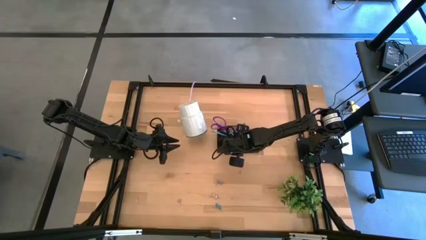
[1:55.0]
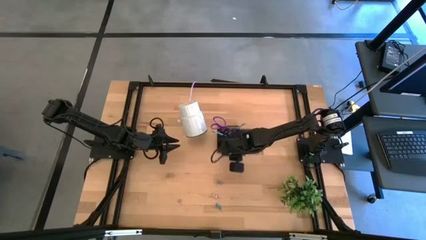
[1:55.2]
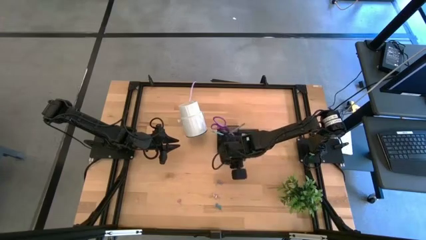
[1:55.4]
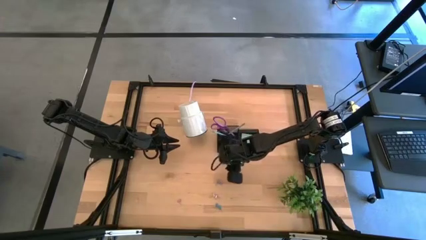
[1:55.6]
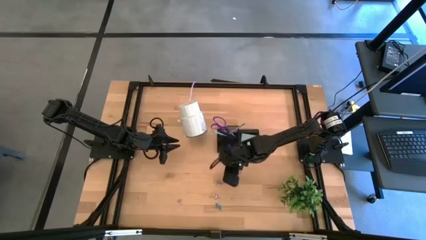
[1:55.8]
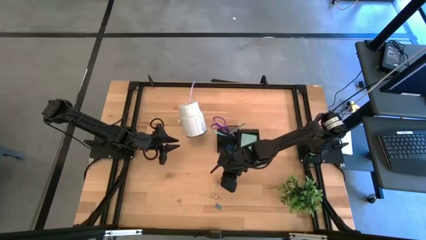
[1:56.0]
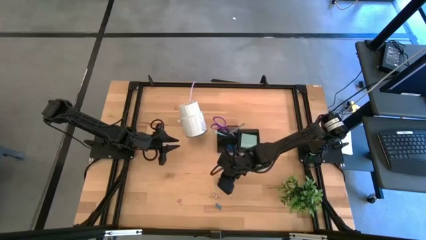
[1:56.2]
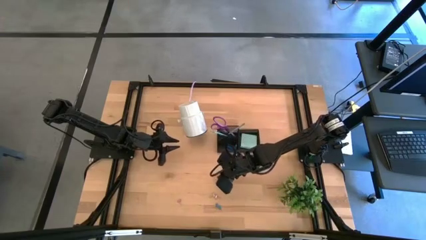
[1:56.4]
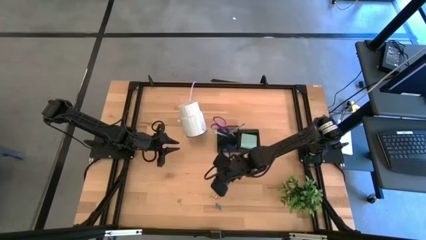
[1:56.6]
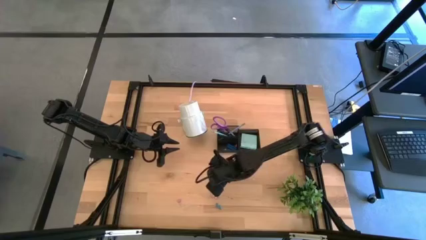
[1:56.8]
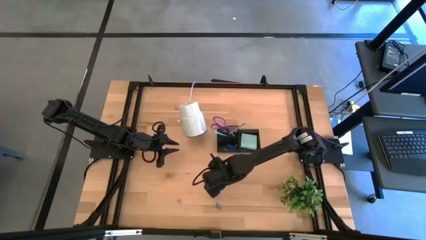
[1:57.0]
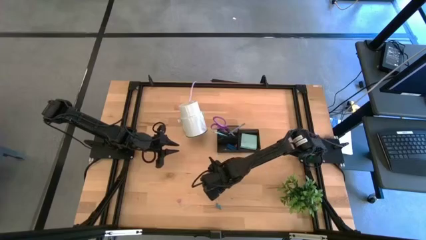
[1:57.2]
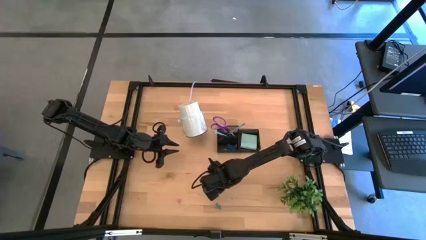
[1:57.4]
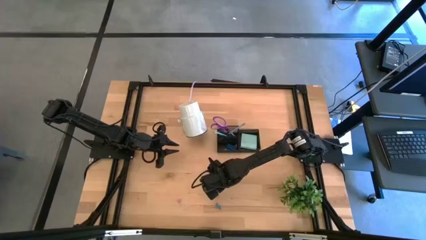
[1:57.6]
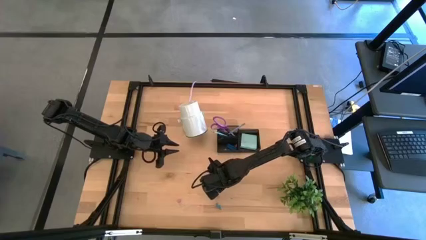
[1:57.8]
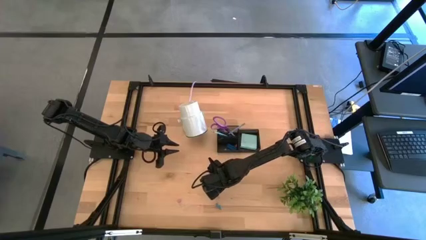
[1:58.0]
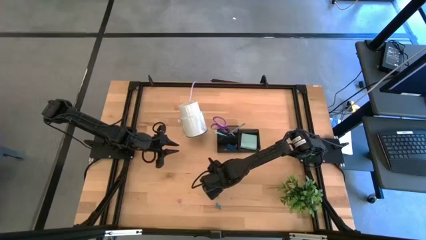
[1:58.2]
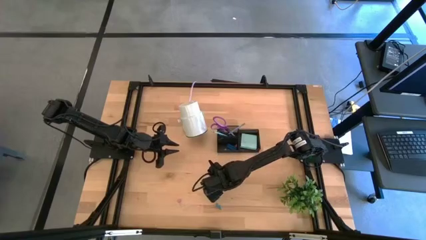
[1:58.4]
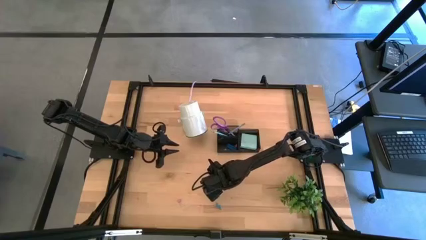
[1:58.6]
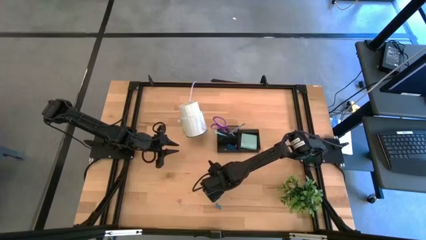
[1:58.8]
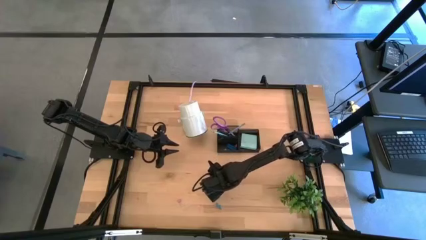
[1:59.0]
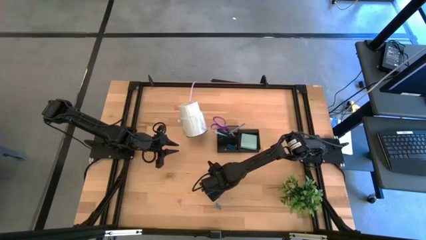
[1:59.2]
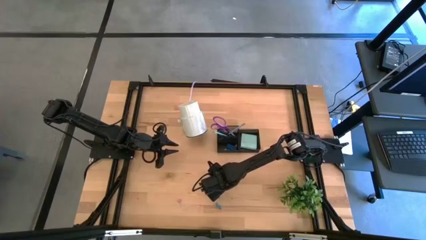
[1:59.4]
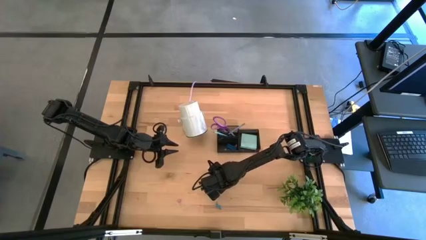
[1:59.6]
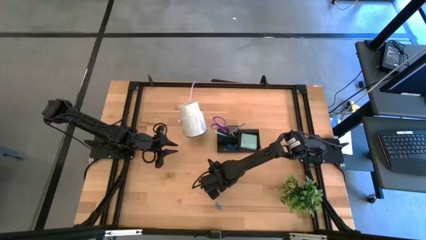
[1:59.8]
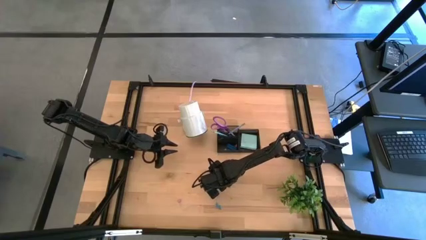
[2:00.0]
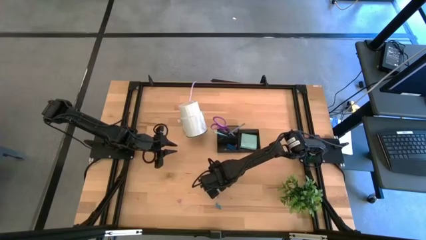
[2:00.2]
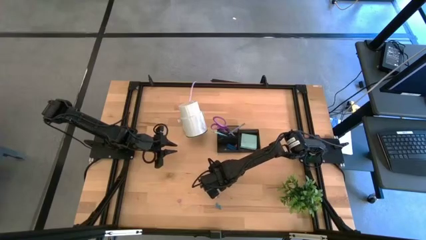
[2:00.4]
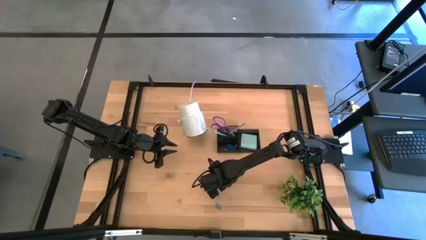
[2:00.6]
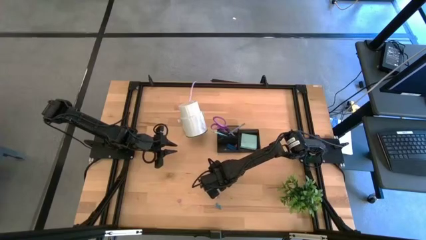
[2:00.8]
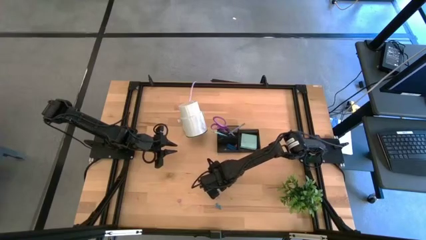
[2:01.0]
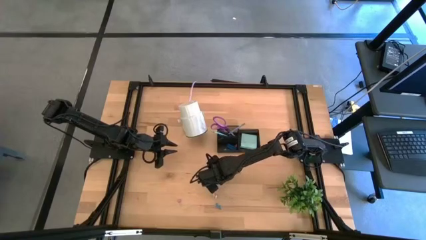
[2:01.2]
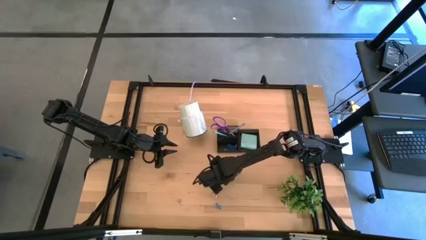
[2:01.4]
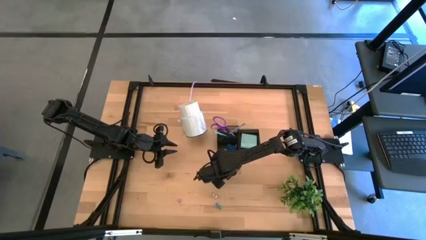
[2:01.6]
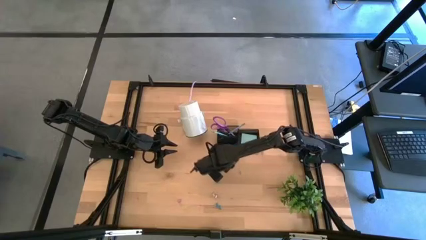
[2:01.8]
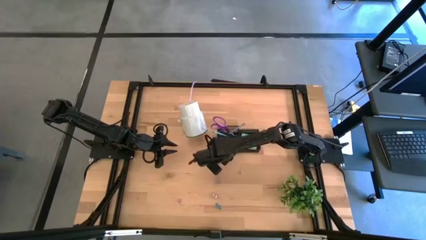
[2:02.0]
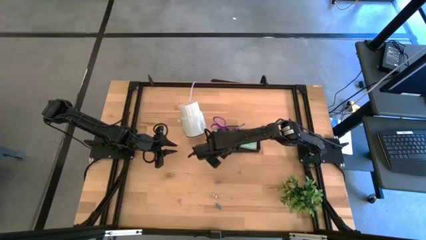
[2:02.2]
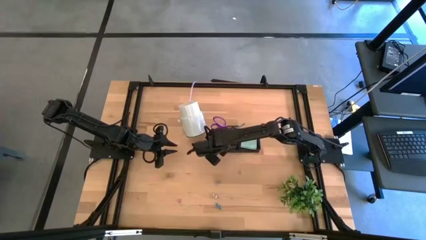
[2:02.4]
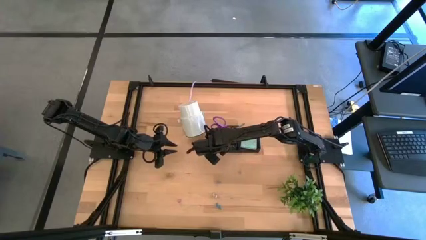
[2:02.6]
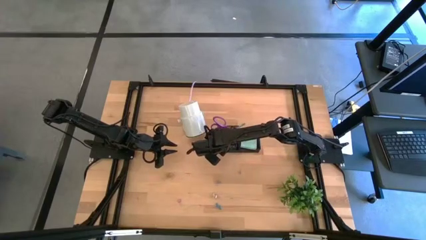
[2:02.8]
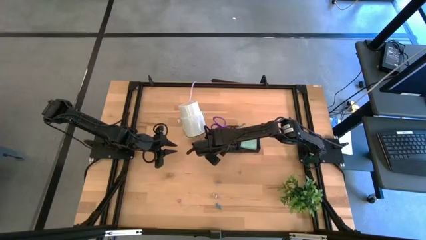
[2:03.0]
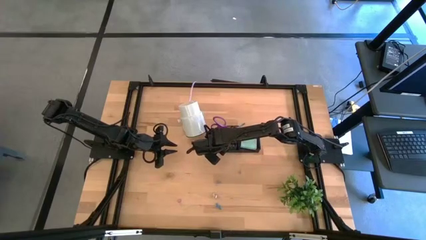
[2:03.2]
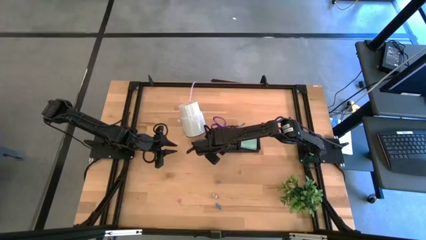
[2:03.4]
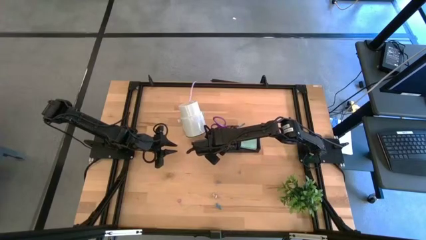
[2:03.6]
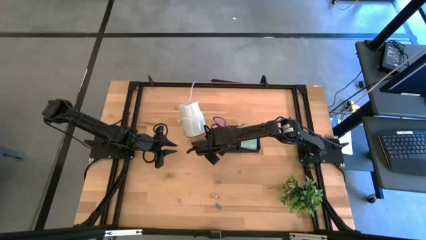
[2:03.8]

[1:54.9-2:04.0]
Task: Pick and place office supplies into organizer
Put the pink binder clip into the black desk organizer

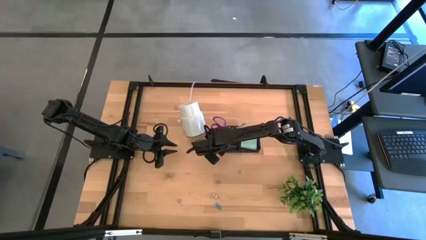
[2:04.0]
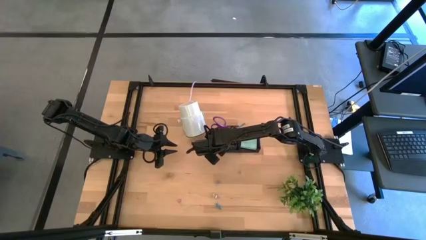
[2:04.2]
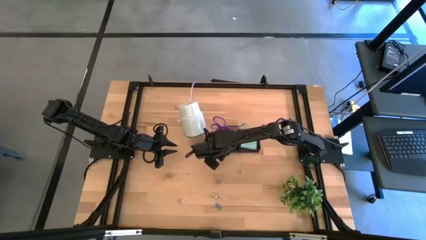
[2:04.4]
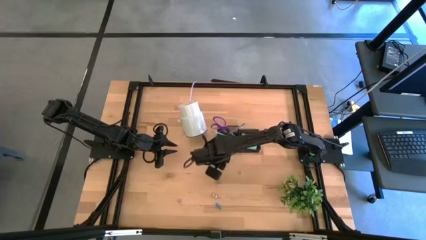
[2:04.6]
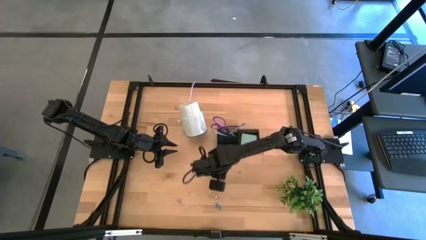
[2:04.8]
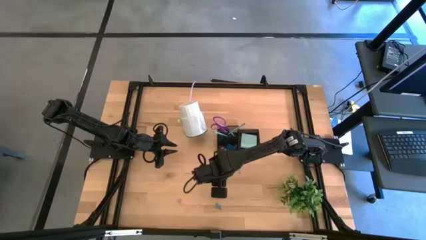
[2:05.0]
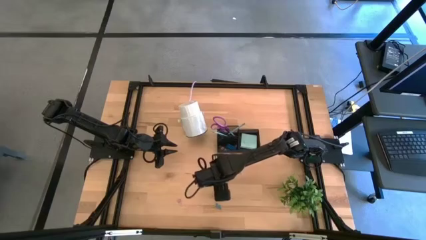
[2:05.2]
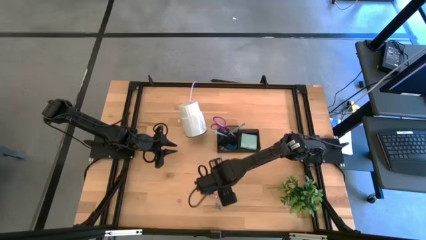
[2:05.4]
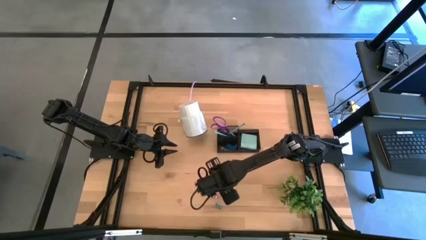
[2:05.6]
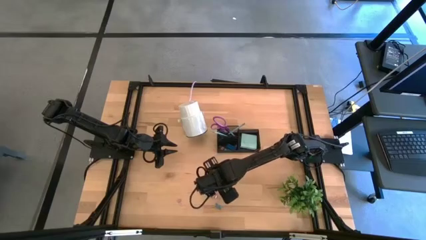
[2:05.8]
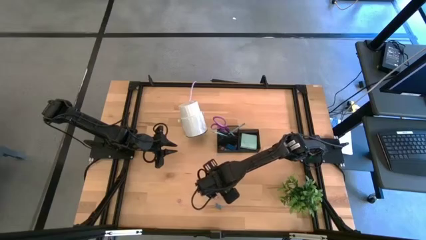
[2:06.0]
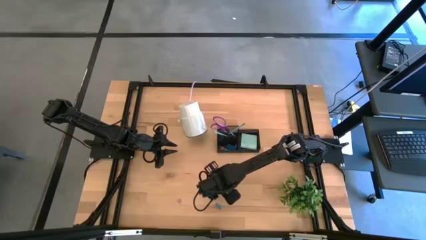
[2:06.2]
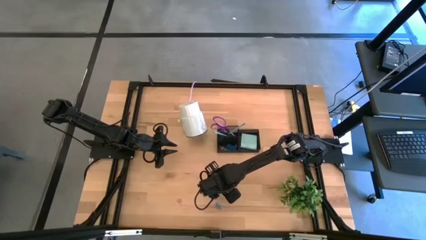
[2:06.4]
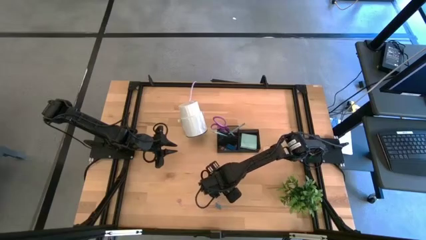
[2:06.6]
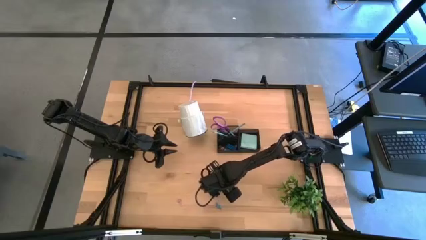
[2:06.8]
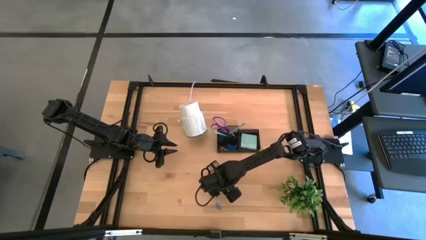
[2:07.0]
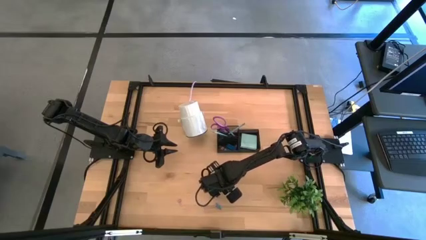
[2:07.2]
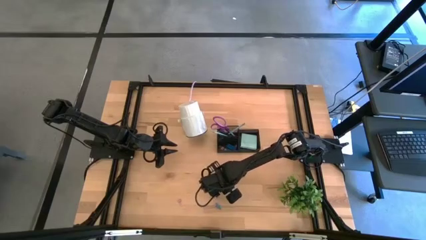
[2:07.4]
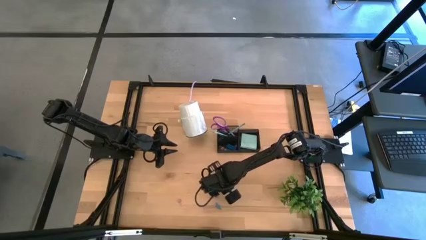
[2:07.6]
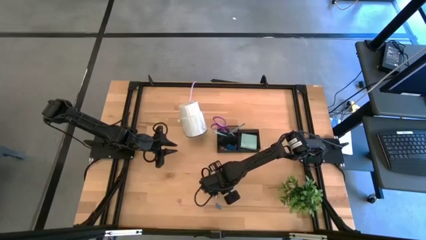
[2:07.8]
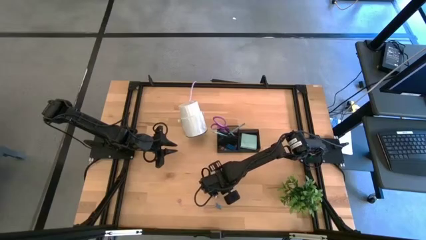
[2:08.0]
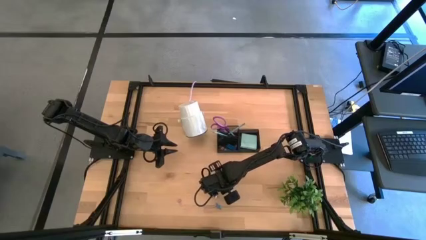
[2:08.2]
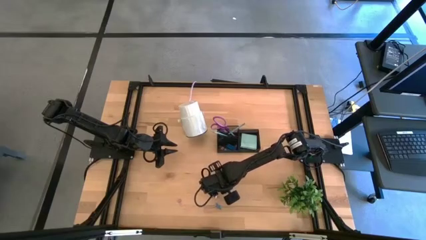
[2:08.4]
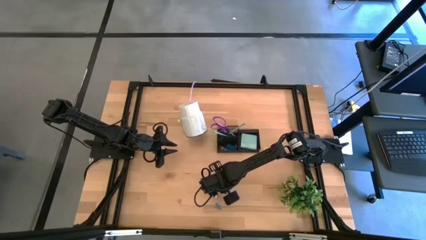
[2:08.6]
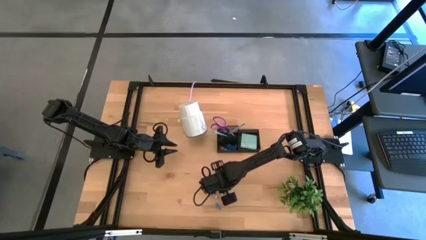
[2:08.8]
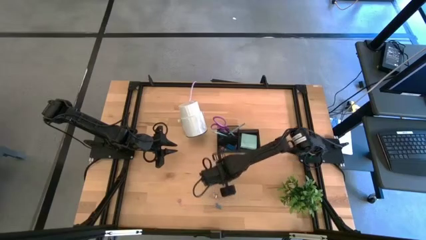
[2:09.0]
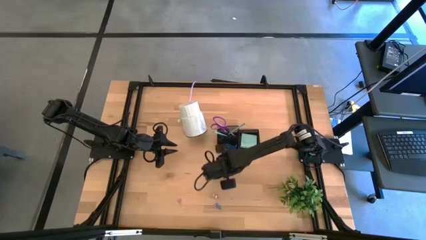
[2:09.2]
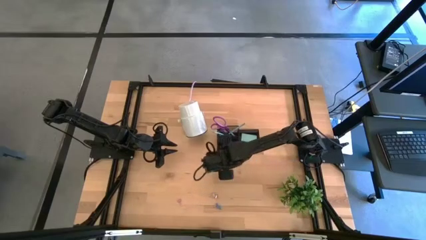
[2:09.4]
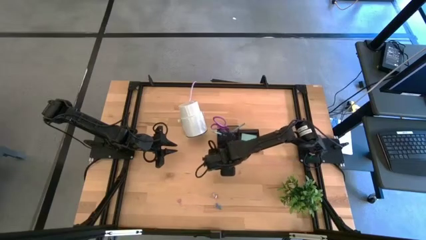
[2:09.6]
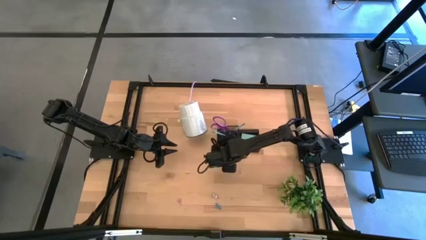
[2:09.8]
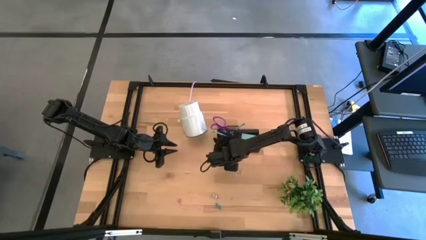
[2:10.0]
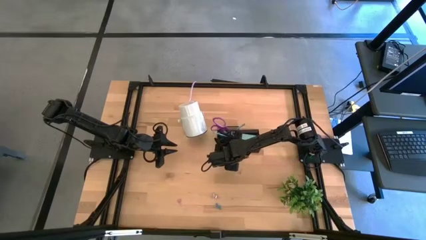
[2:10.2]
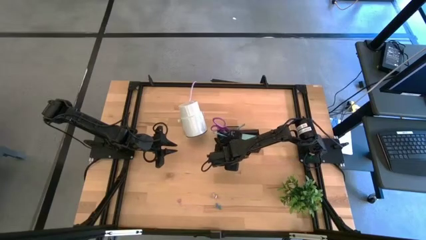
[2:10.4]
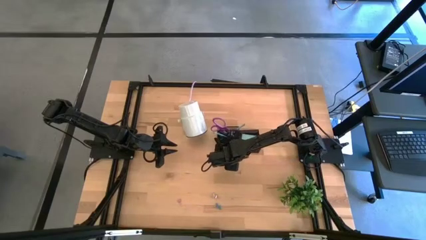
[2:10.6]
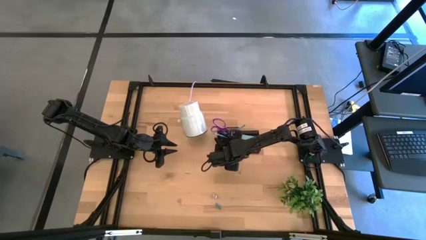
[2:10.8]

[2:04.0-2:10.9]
Put the top blue binder clip into the black desk organizer
